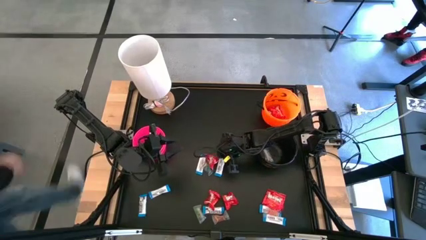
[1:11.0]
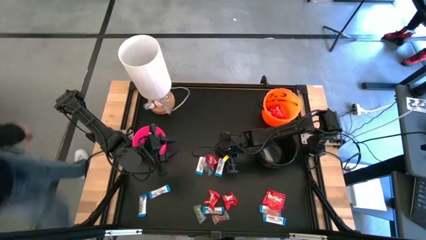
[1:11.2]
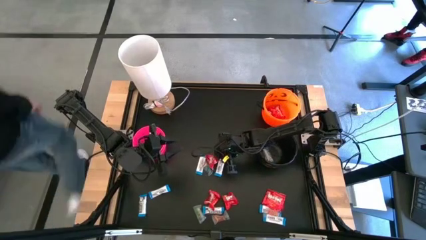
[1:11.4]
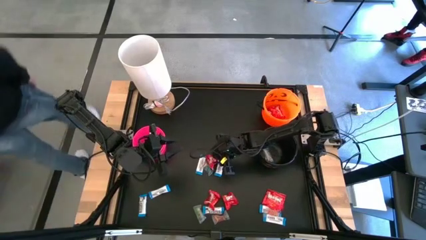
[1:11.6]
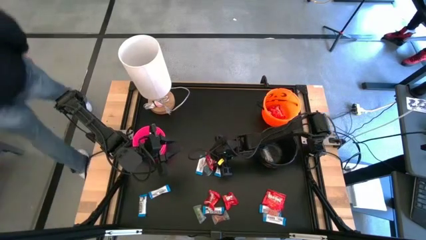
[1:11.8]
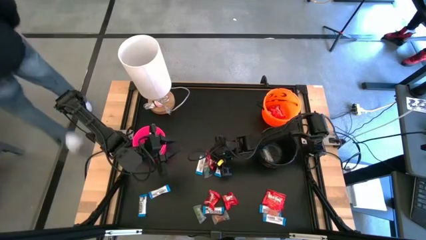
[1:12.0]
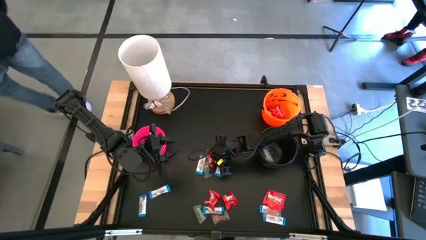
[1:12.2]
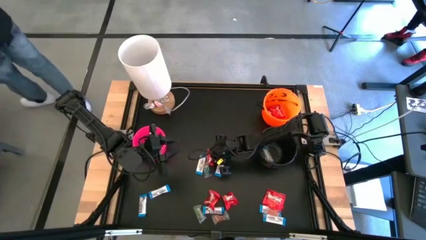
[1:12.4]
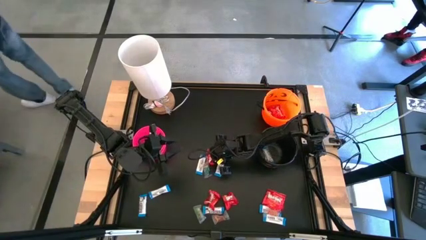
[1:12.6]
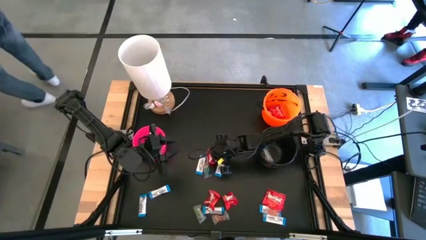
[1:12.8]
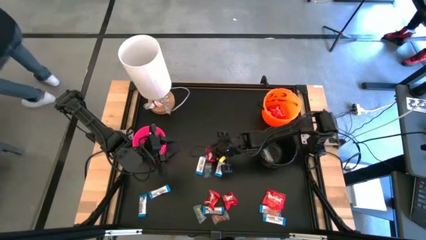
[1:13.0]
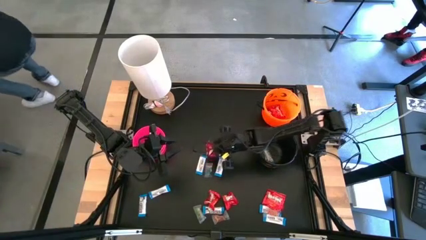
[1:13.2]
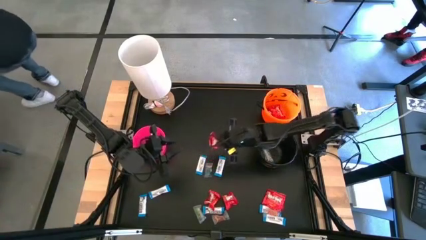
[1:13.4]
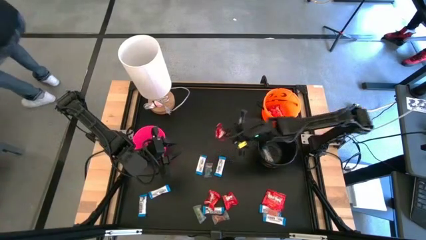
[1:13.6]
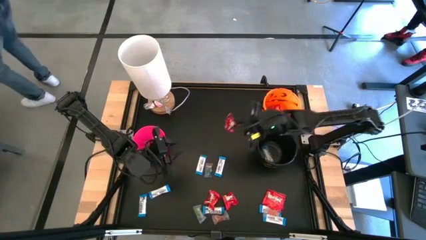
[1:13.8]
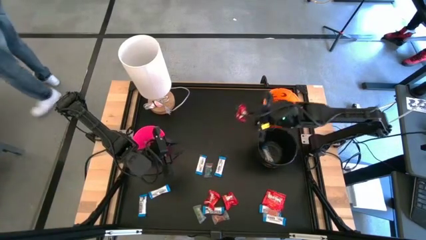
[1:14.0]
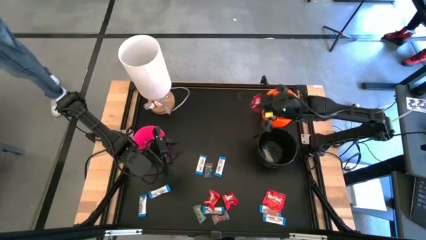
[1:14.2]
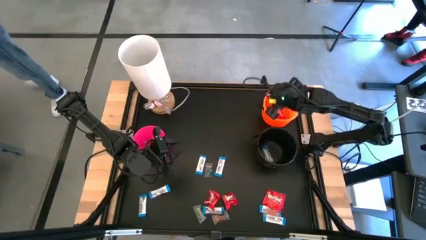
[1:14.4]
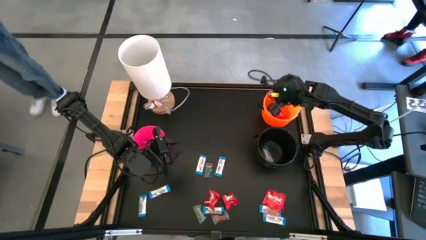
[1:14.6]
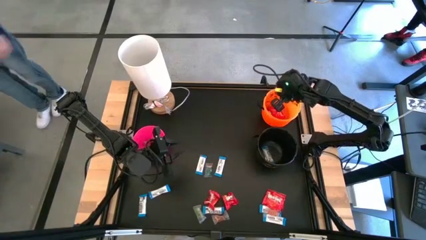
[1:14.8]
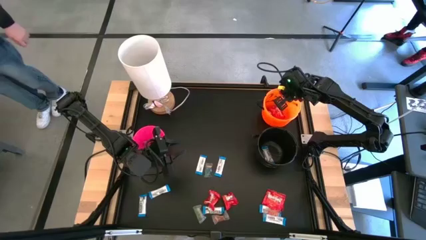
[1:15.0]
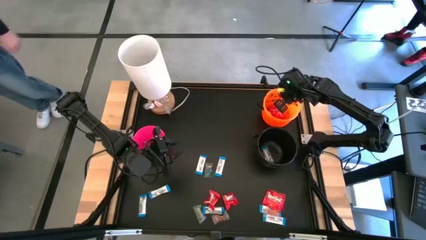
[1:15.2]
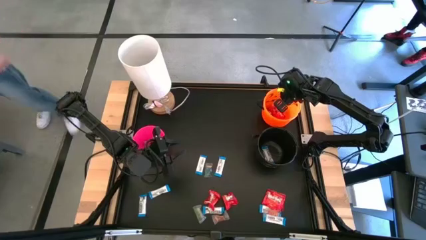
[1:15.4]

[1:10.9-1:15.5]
Task: Sort candy
Put the red candy into the orange bucket

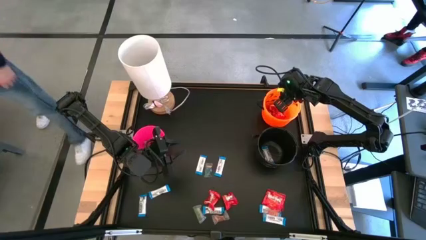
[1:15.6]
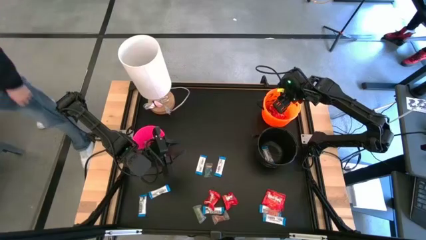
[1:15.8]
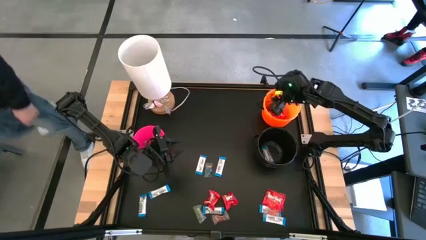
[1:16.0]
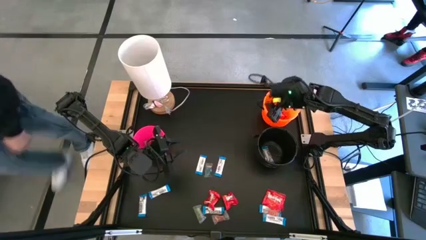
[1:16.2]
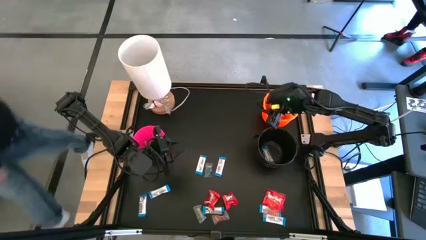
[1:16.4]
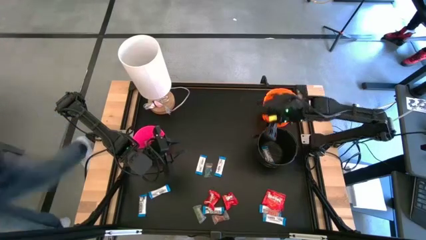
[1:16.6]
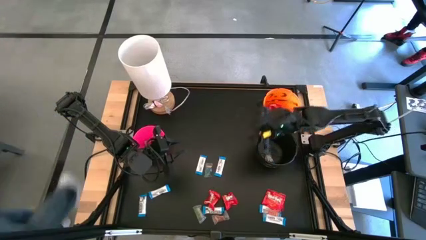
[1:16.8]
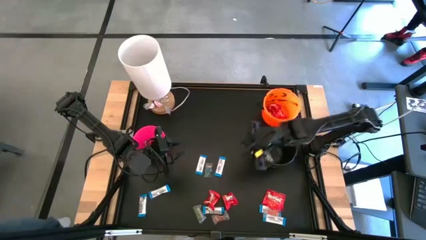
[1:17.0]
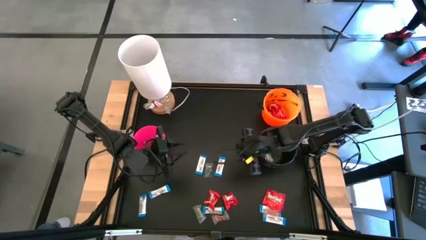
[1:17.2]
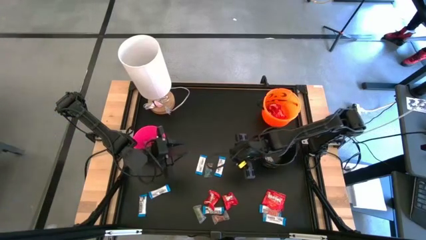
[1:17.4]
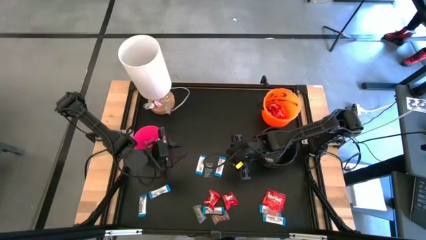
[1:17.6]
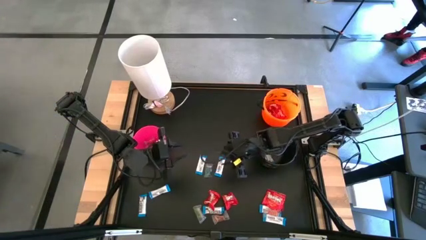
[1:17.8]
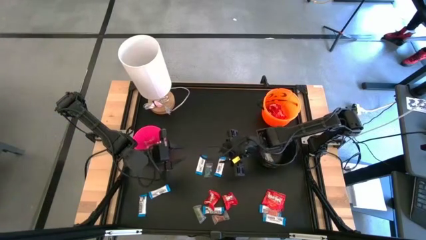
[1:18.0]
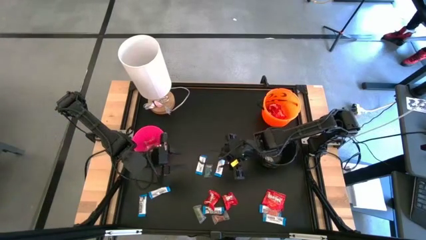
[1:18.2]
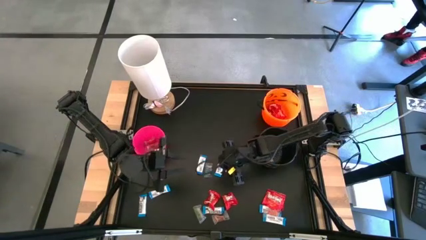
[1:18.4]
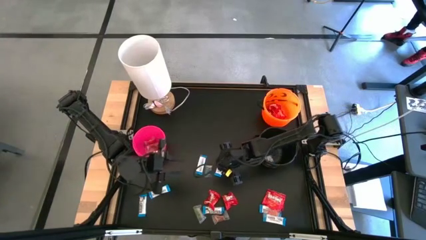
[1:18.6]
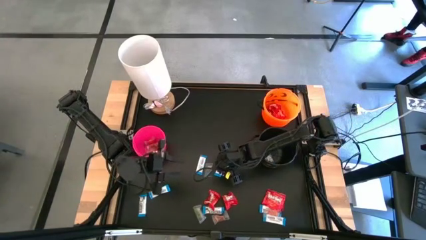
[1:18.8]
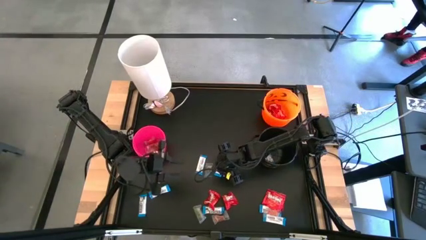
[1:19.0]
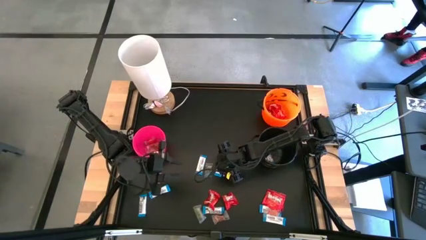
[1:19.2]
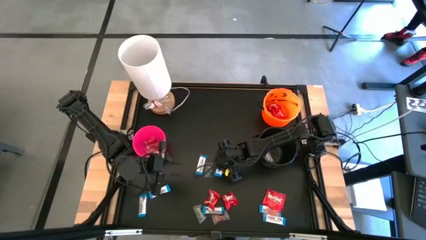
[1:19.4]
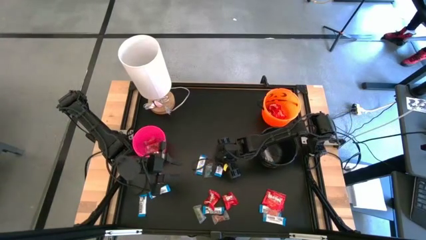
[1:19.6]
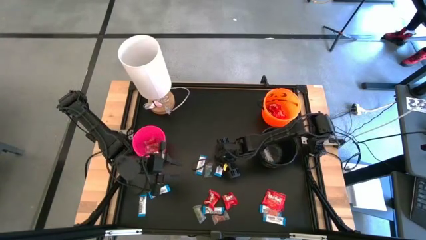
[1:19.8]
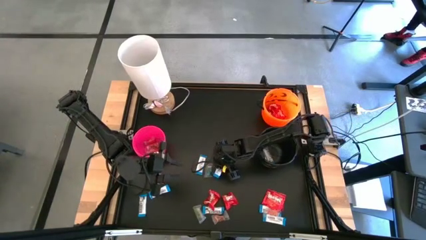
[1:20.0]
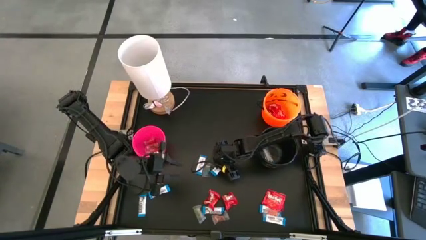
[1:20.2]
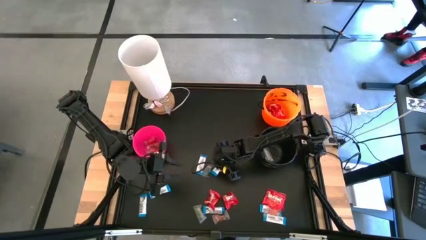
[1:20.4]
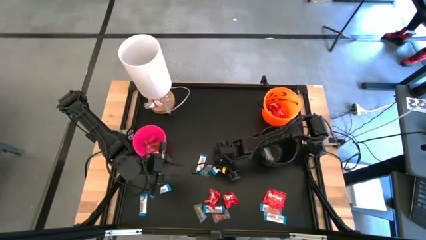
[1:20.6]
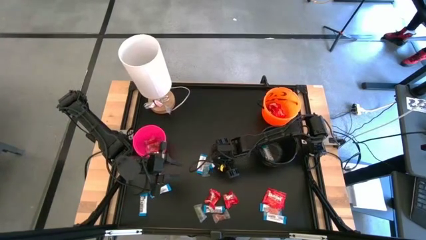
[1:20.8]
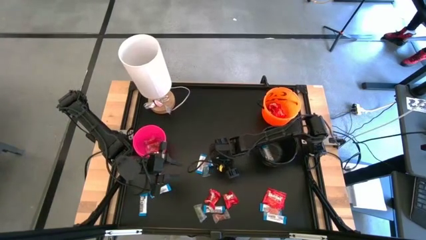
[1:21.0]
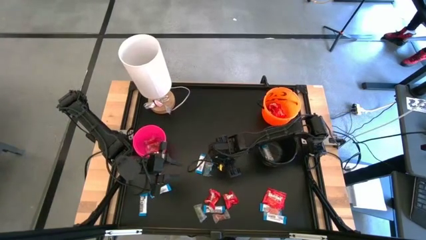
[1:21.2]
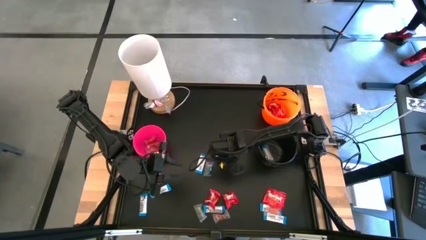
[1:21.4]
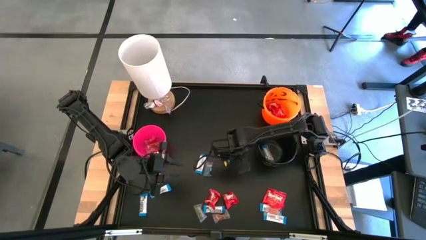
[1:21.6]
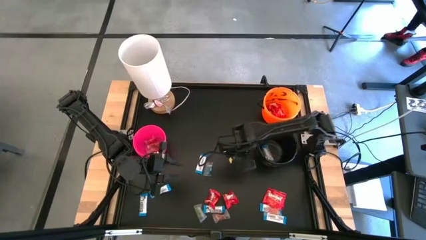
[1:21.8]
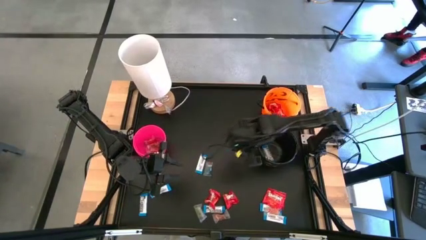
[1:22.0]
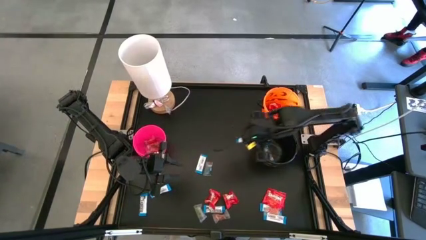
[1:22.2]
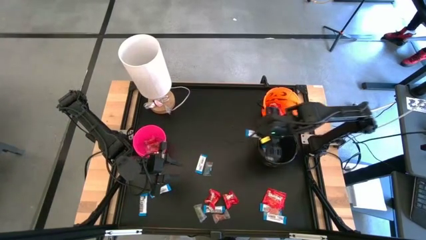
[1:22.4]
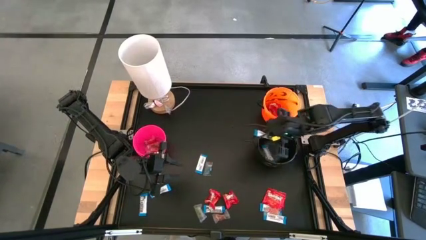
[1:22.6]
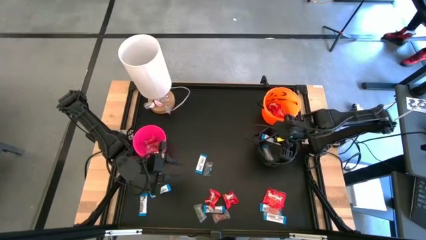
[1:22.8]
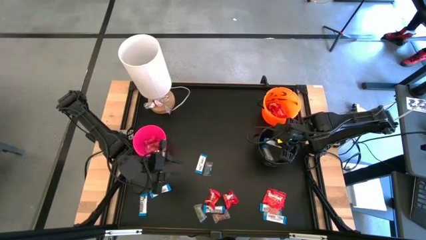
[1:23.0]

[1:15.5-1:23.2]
Put the white chocolate into the black bucket

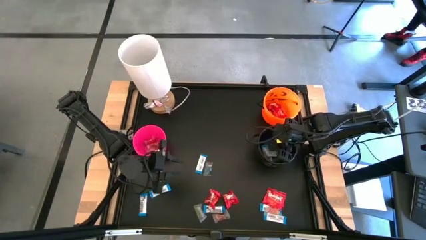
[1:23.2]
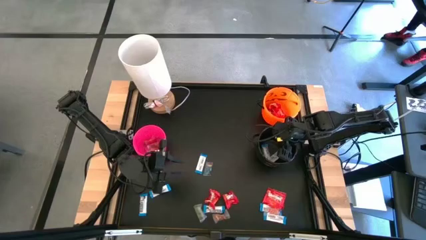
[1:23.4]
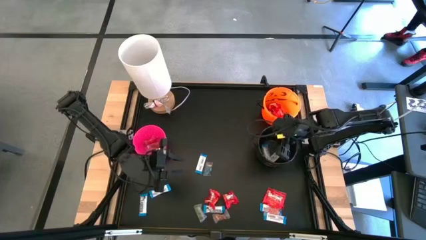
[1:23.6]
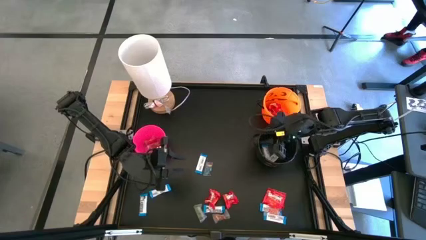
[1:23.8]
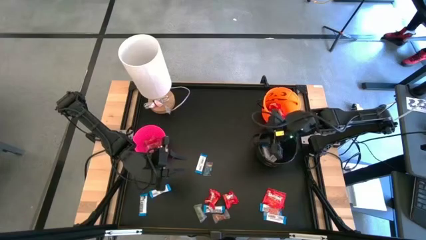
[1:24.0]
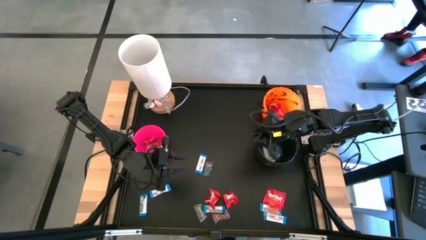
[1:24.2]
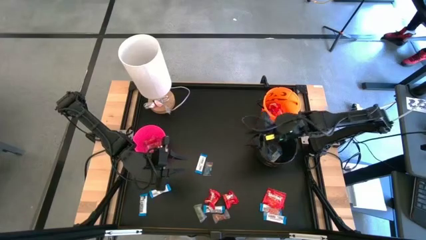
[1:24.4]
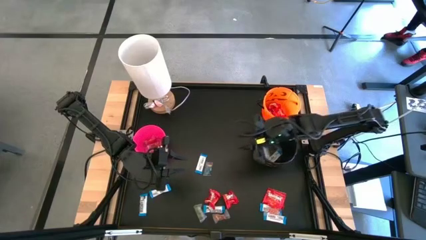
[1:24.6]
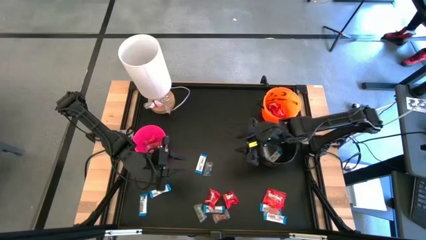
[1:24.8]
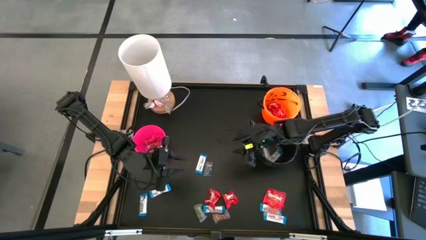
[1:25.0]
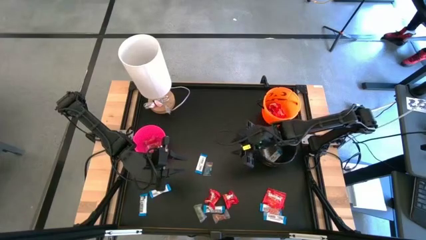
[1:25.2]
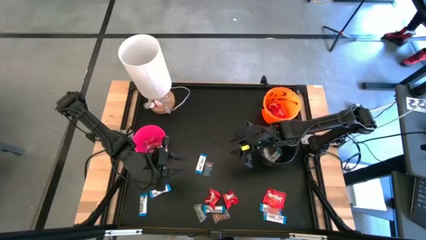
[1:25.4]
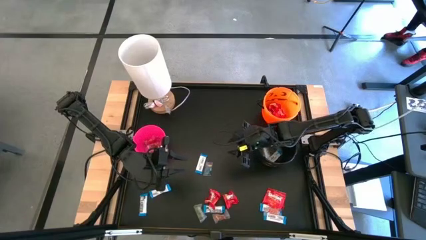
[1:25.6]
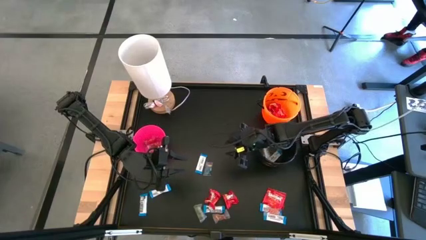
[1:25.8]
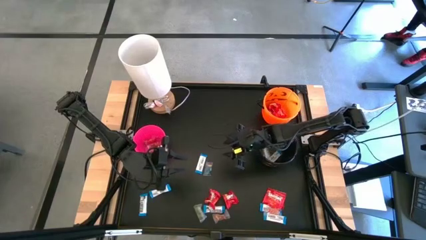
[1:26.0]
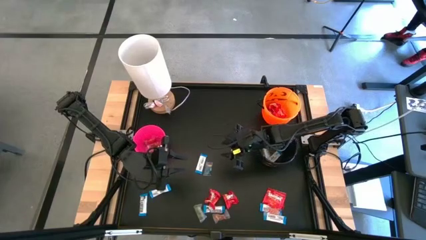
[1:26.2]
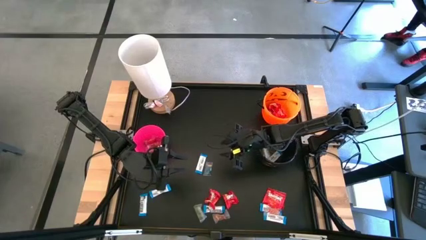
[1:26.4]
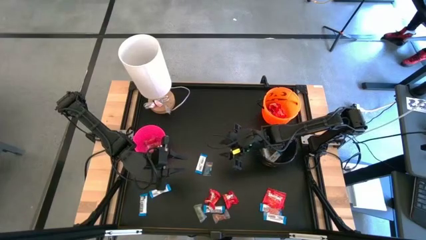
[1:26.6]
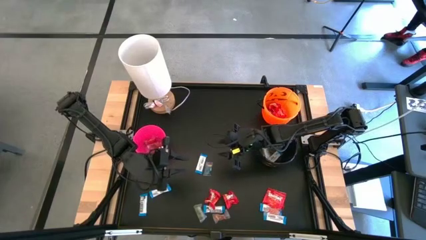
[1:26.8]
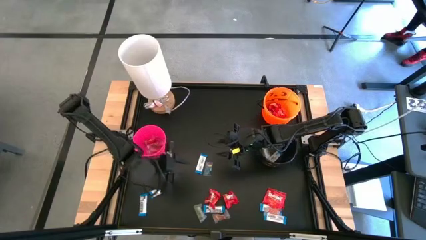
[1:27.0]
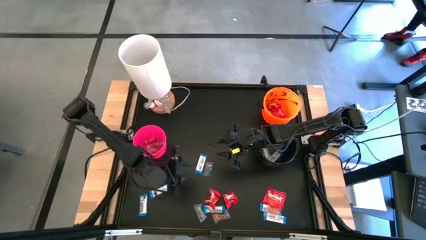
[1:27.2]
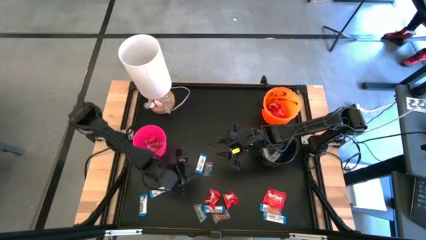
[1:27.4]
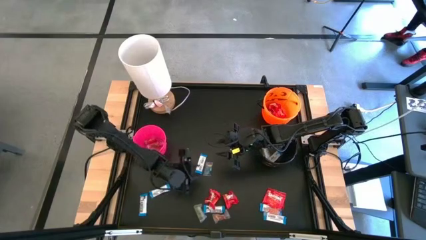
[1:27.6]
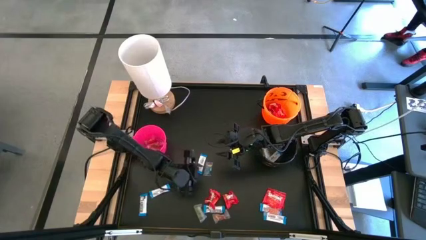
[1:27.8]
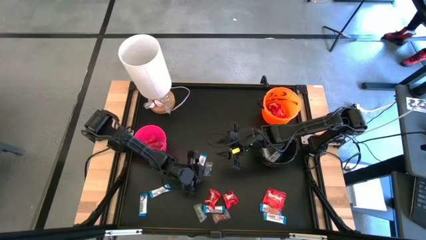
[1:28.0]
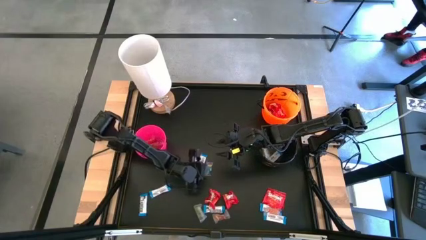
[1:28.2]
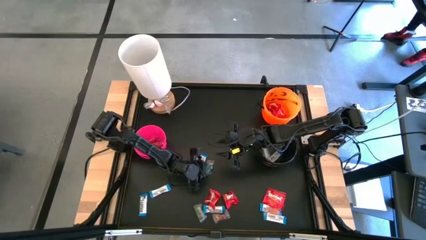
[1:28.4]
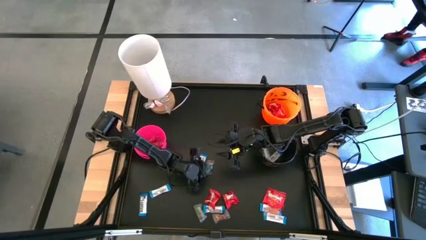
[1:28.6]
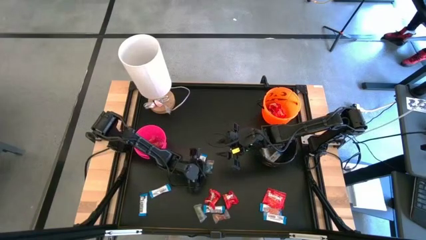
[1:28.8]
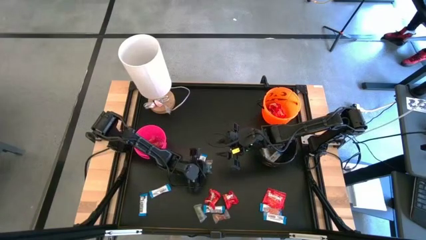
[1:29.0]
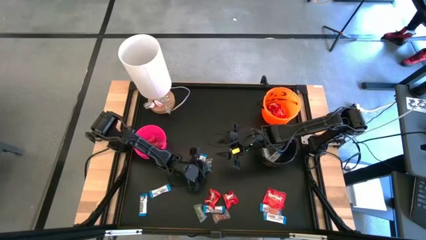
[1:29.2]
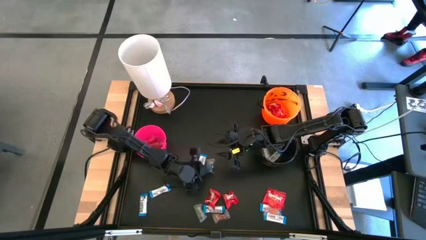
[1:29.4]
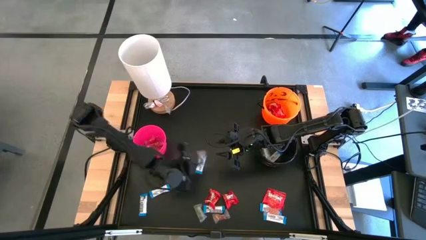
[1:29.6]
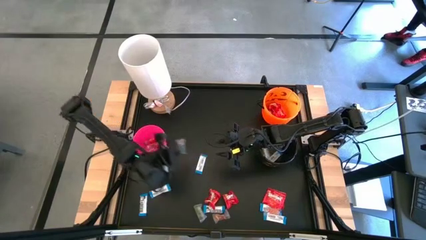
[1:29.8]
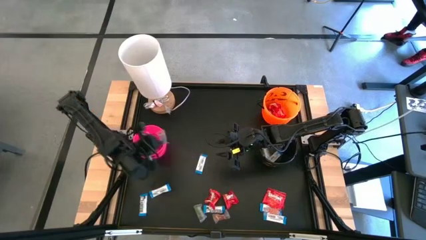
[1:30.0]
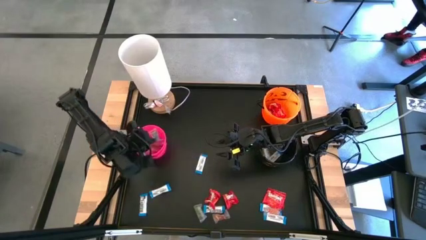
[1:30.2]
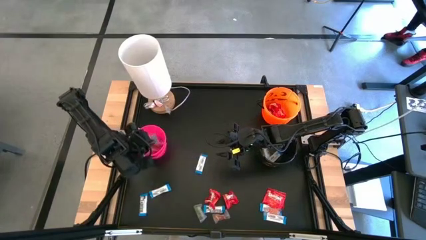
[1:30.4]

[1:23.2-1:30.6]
Put the blue gummy into the pink bucket
